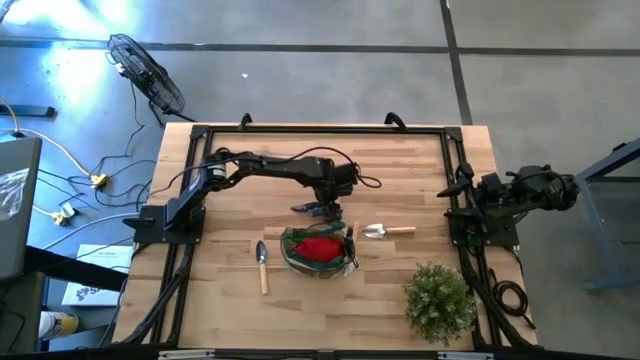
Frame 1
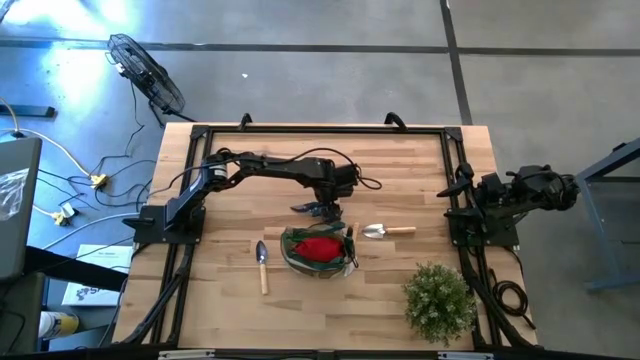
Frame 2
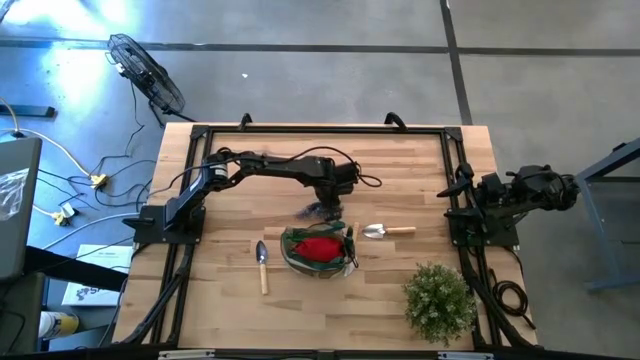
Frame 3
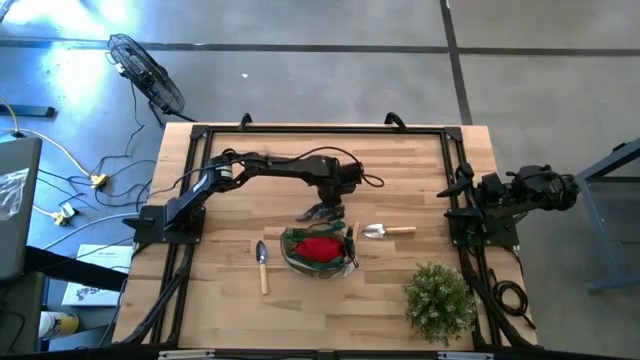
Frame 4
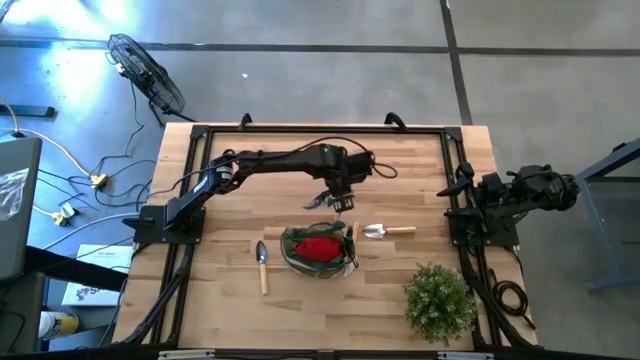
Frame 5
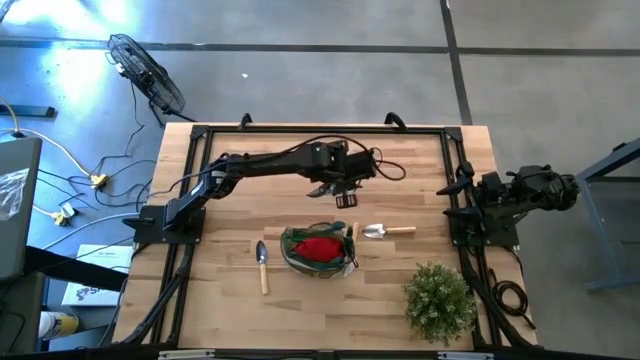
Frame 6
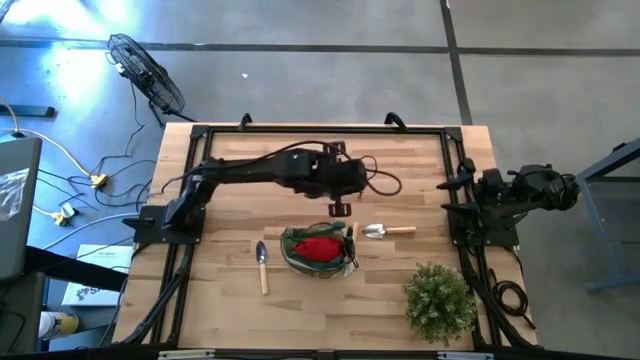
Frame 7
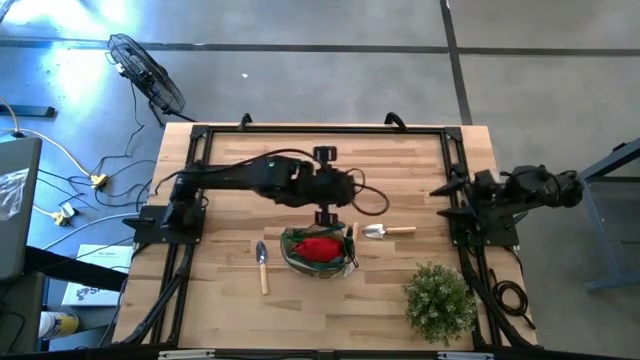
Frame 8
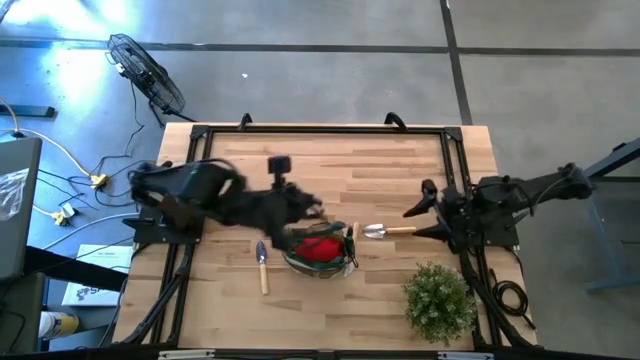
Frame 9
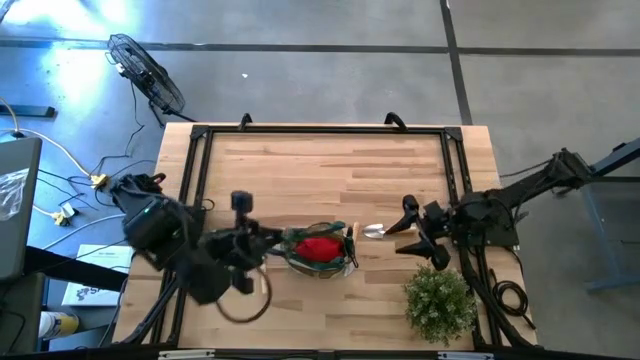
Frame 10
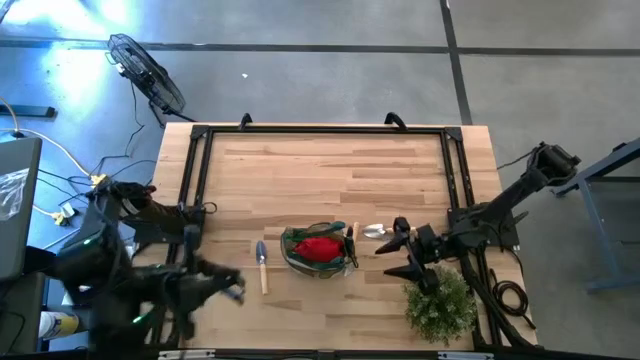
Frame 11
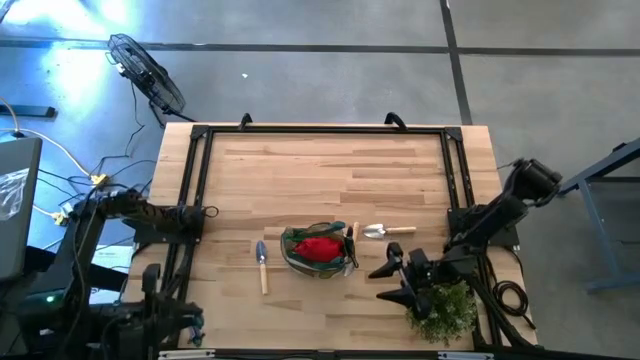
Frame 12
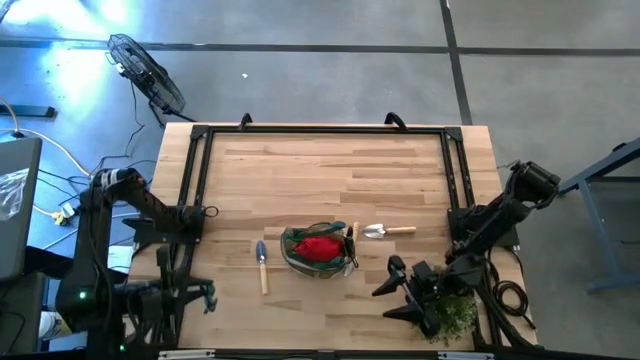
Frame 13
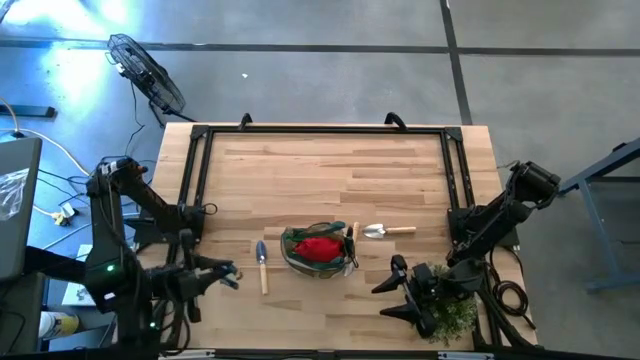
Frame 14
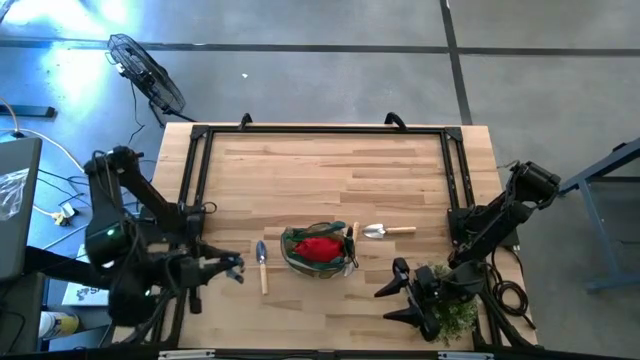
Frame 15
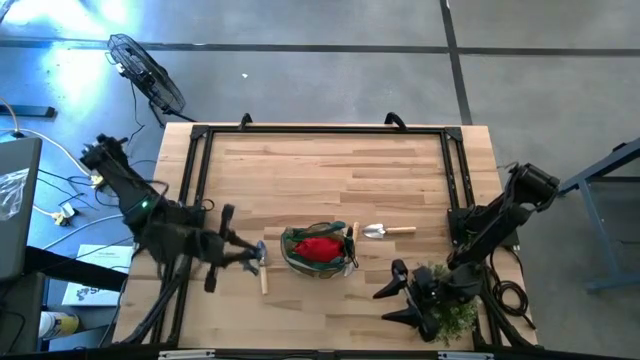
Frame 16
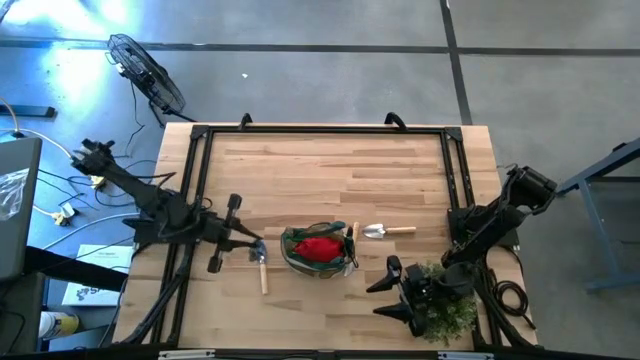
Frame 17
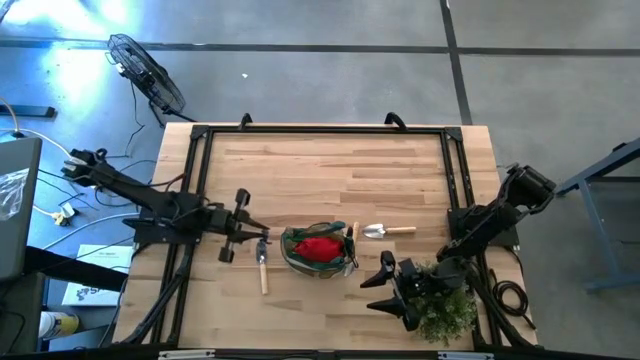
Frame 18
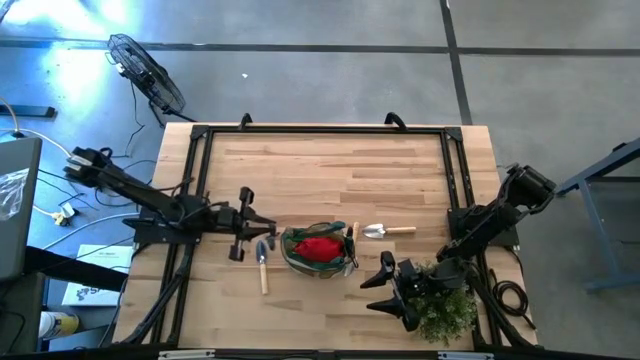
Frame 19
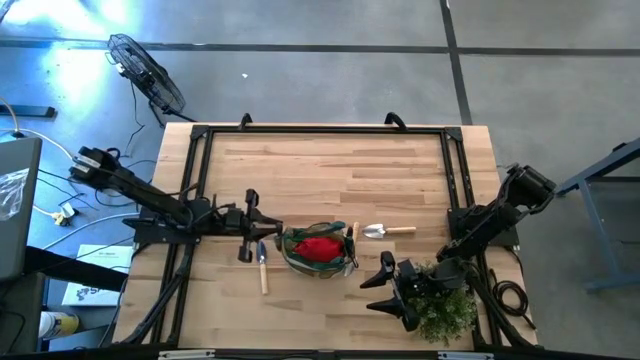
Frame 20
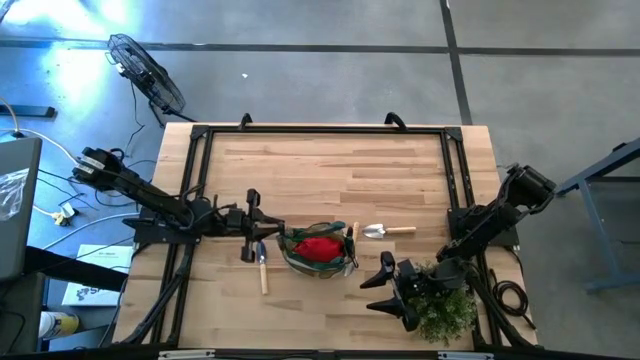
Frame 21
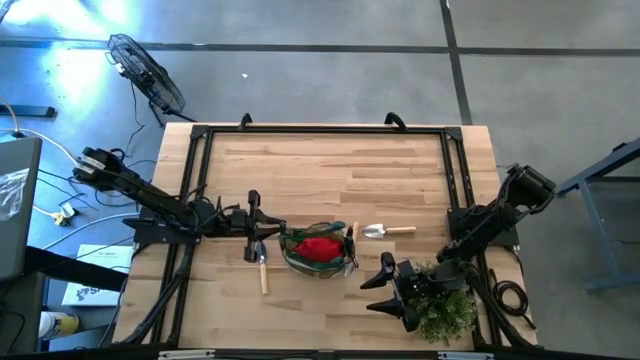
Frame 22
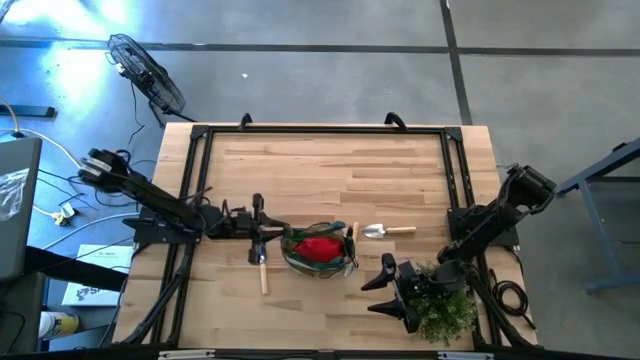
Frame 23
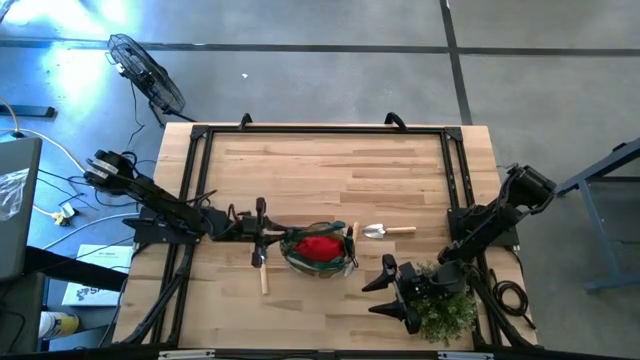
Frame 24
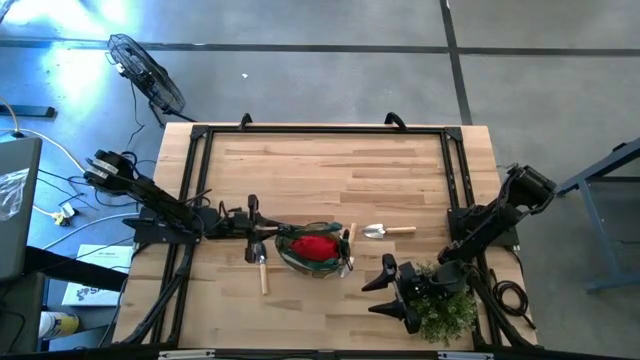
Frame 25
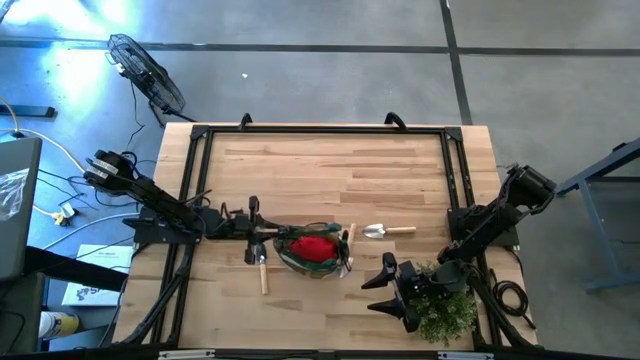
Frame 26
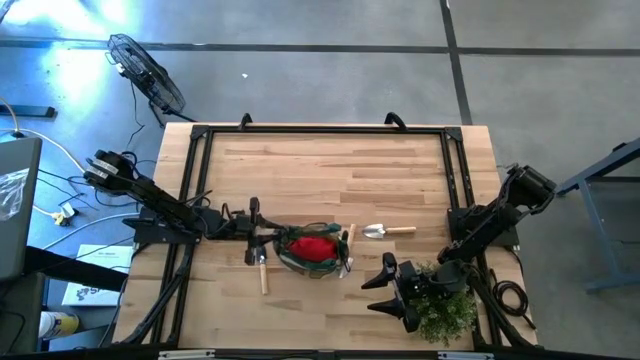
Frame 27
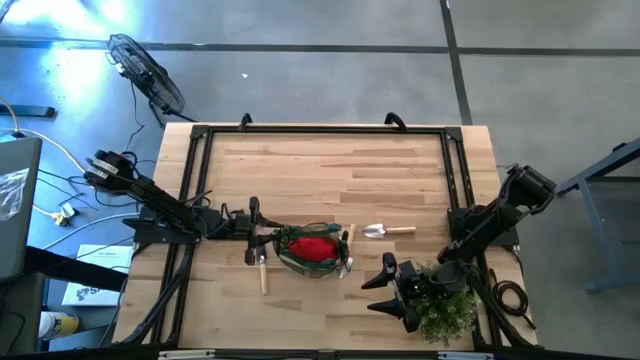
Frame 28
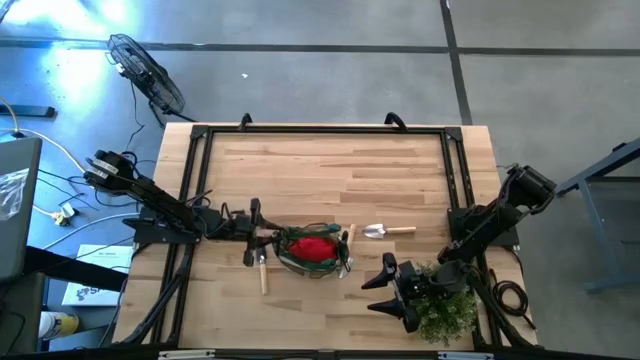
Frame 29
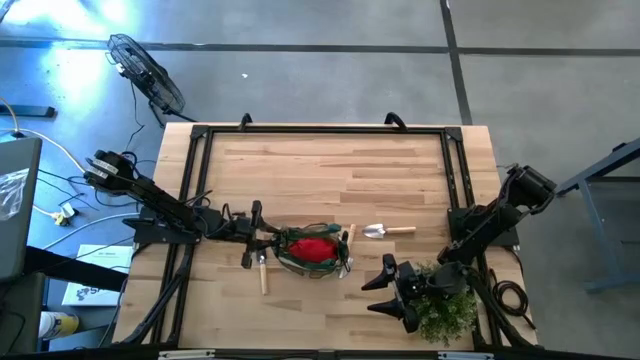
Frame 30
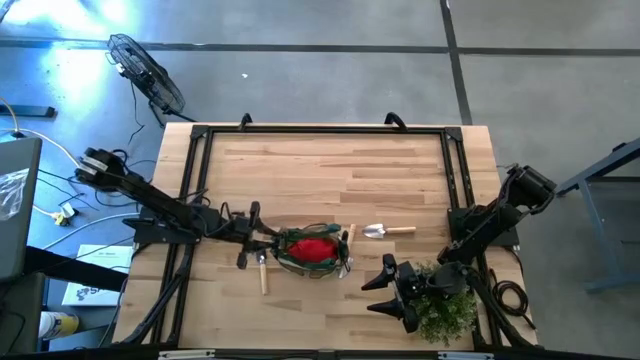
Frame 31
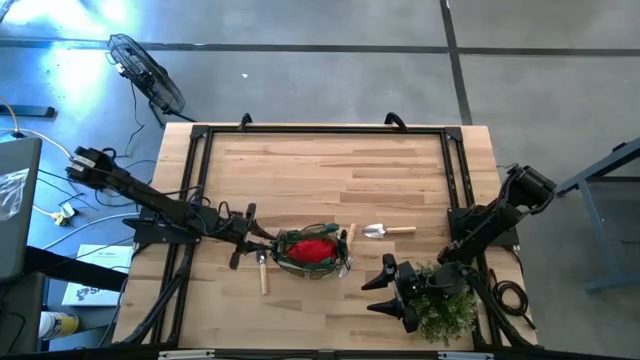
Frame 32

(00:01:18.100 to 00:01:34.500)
Task: Pick & Place Garden tools in Gardening bag
Put the green shear scissors into the green gardening bag

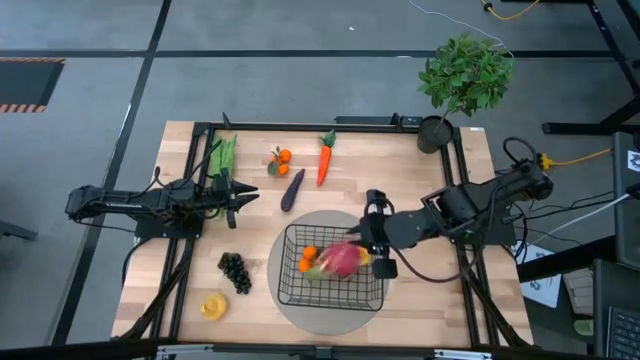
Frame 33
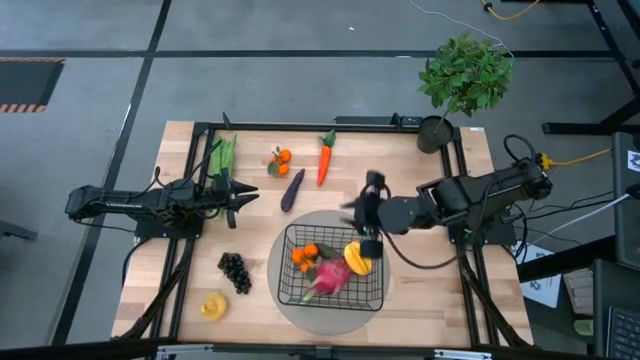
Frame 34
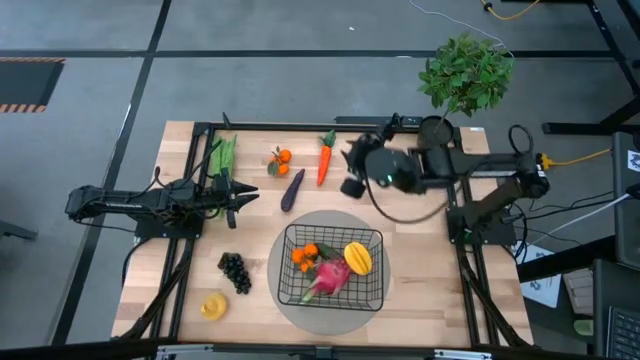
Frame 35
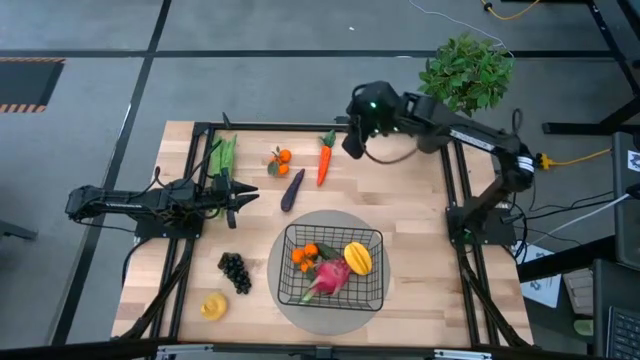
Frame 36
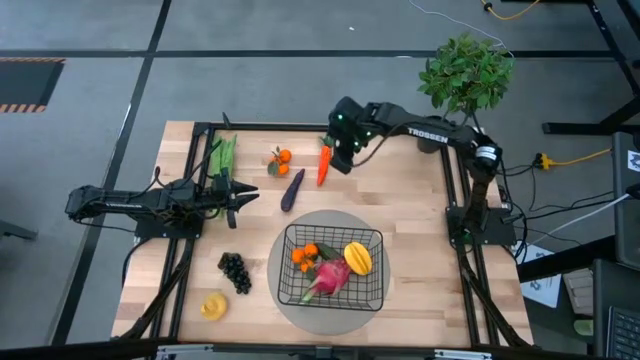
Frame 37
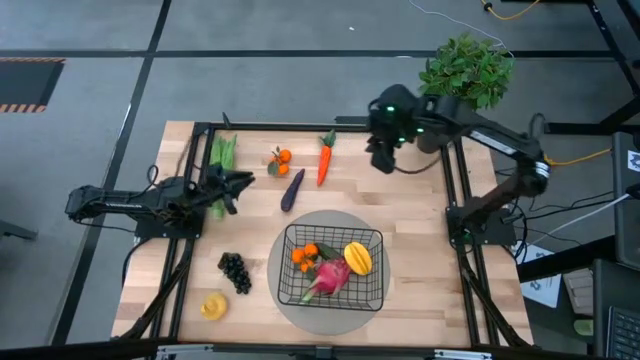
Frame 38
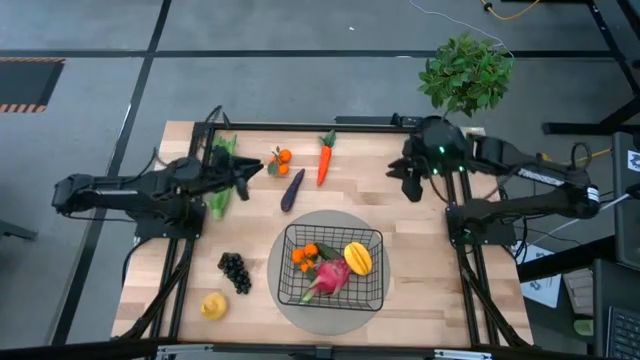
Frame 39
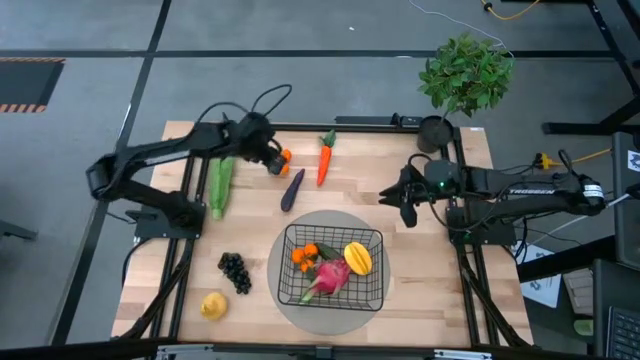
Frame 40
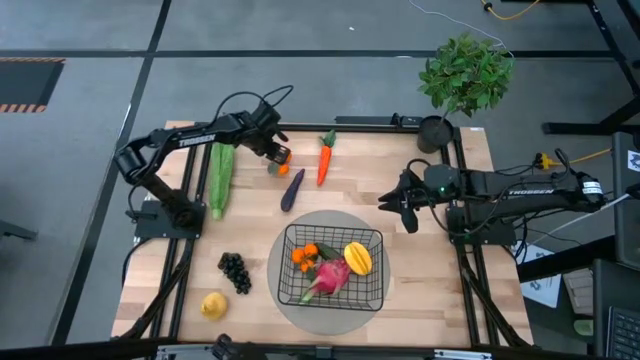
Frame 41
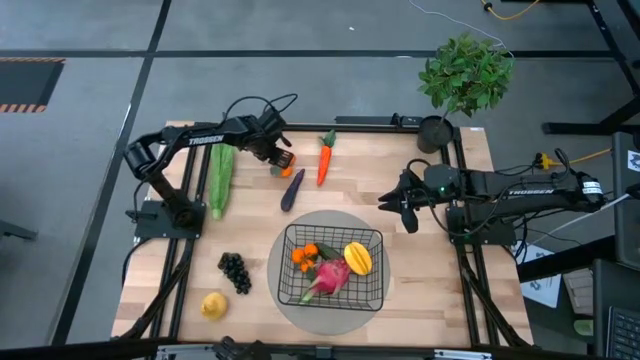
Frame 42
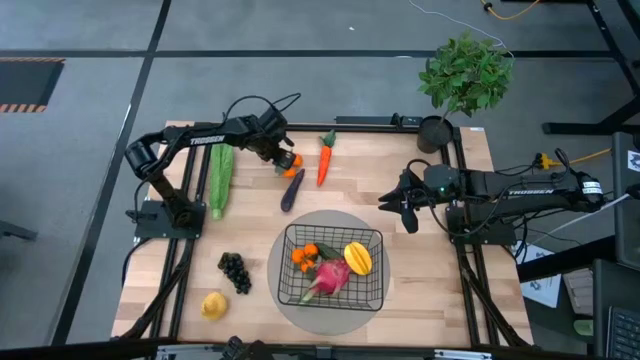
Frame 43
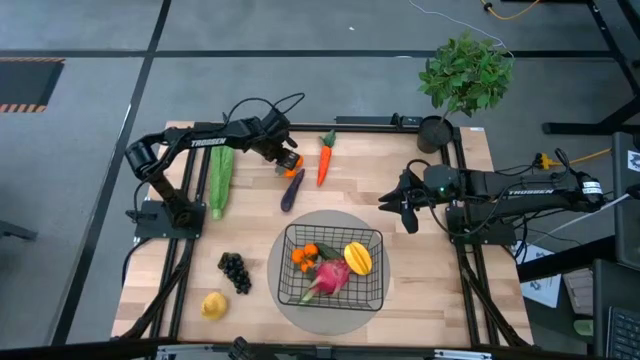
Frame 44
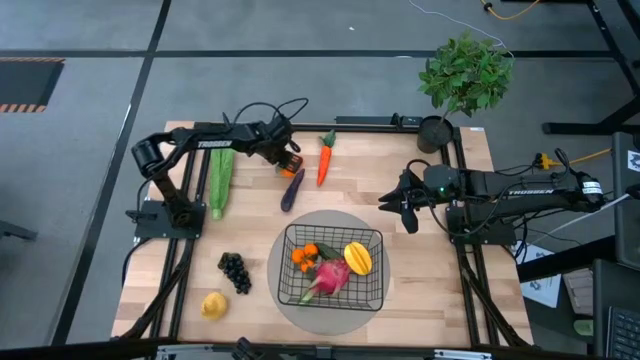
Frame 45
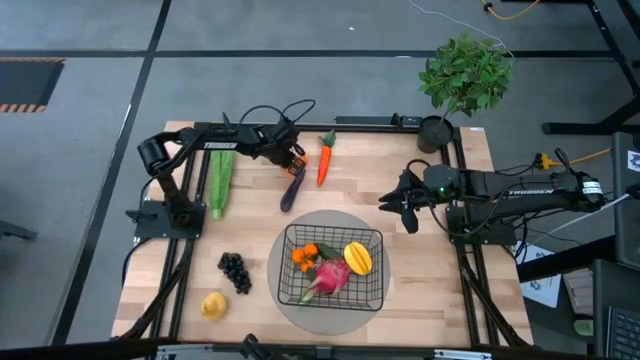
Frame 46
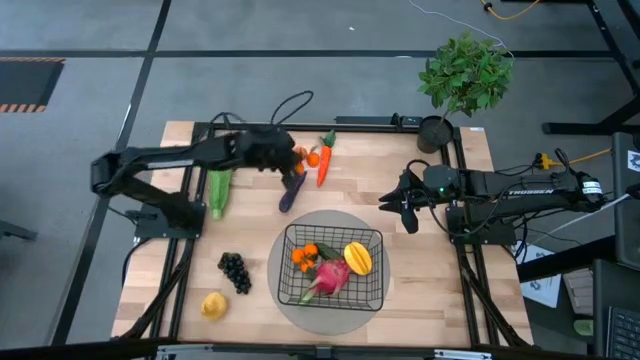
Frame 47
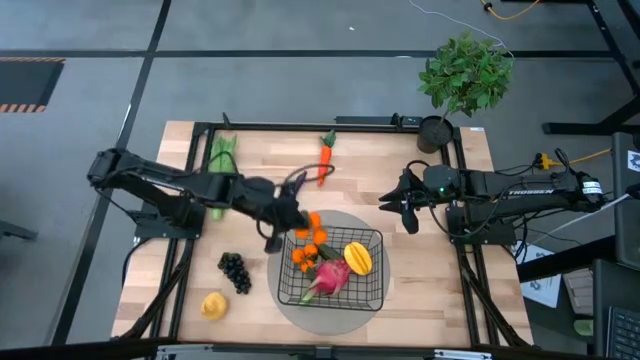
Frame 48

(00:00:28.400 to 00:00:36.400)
Task: Build produce basket
Put the oranges into the black wire basket
